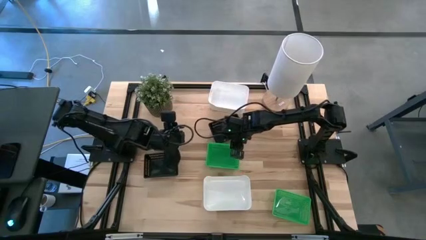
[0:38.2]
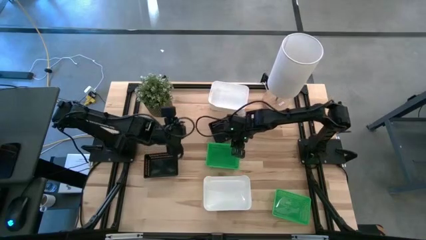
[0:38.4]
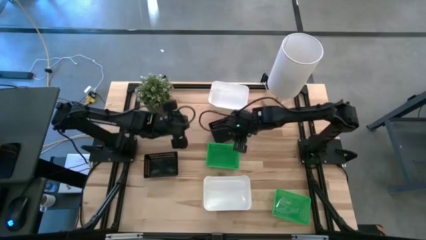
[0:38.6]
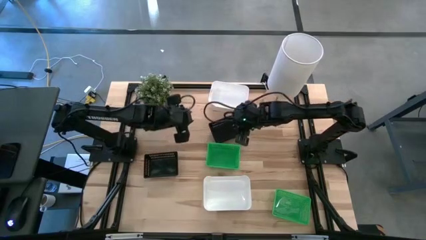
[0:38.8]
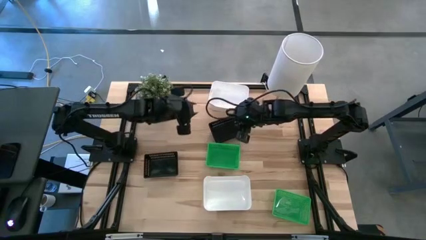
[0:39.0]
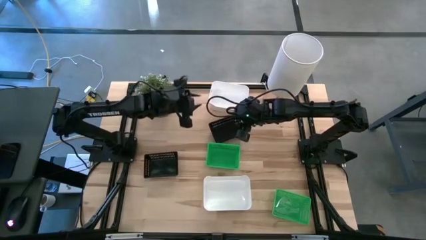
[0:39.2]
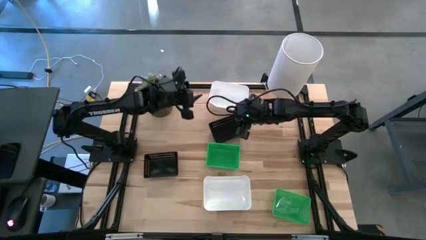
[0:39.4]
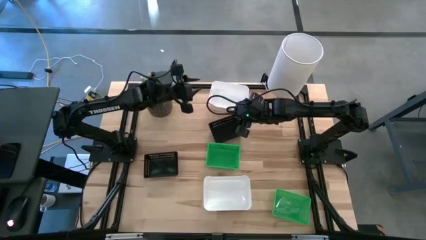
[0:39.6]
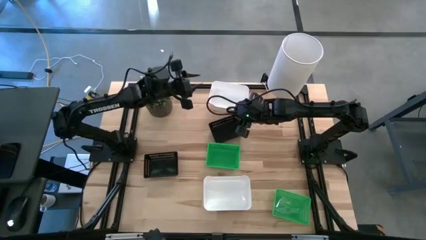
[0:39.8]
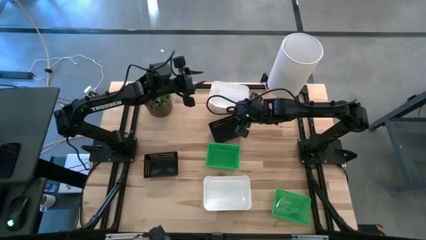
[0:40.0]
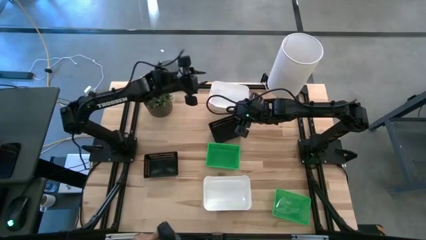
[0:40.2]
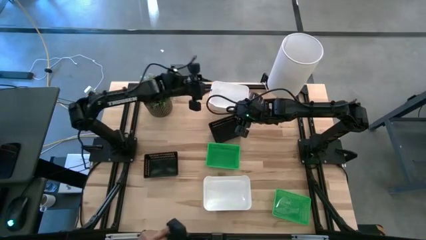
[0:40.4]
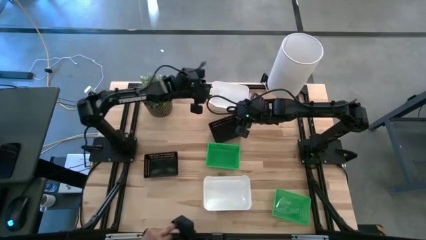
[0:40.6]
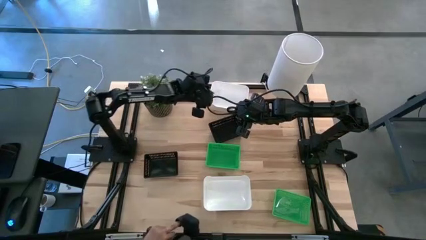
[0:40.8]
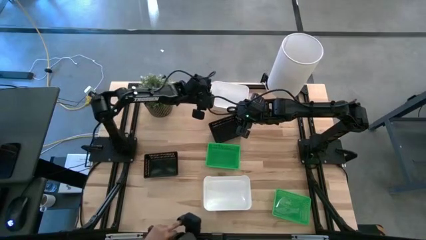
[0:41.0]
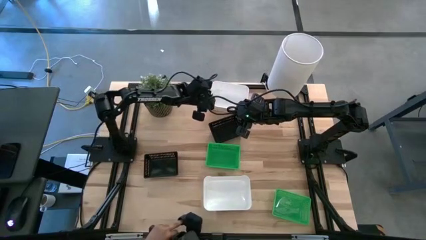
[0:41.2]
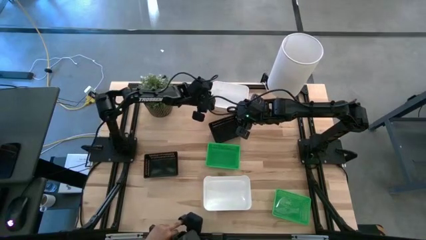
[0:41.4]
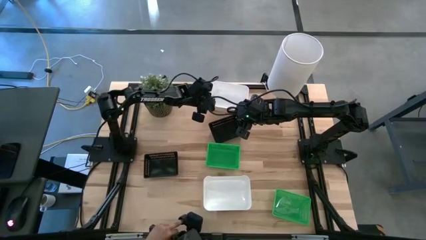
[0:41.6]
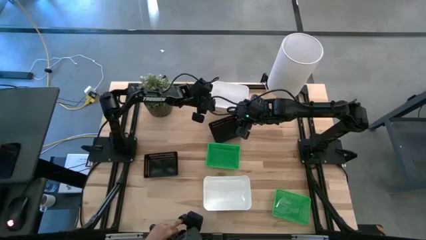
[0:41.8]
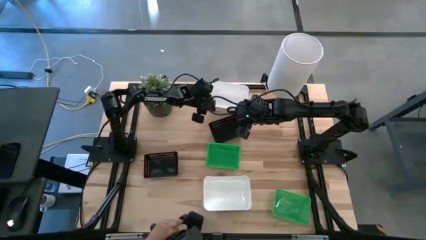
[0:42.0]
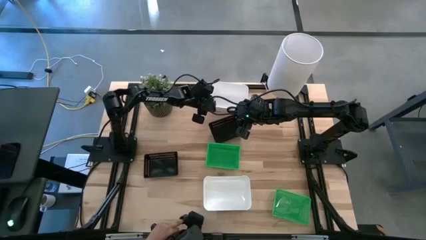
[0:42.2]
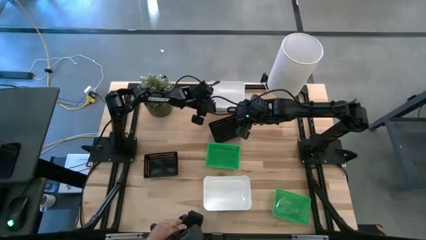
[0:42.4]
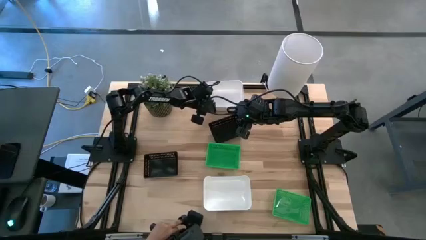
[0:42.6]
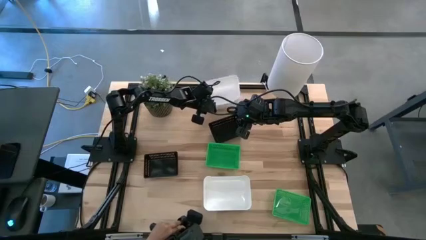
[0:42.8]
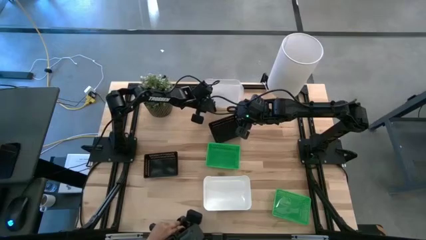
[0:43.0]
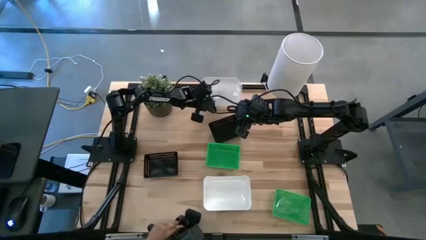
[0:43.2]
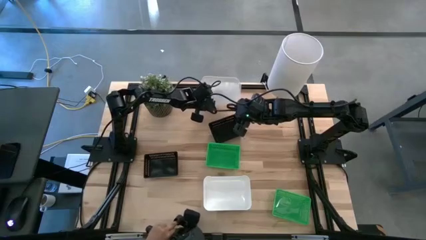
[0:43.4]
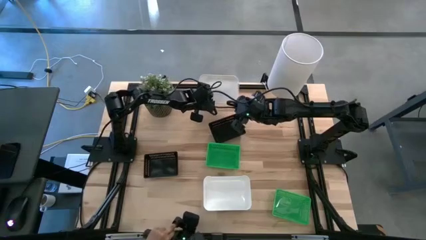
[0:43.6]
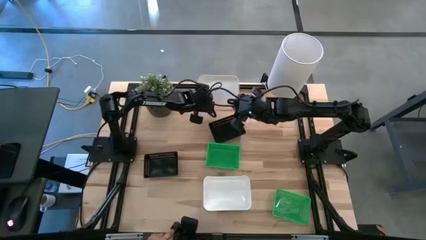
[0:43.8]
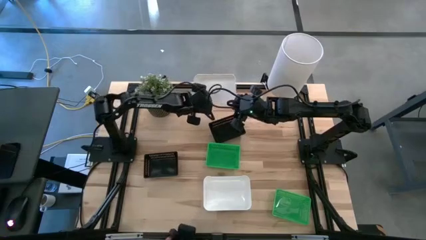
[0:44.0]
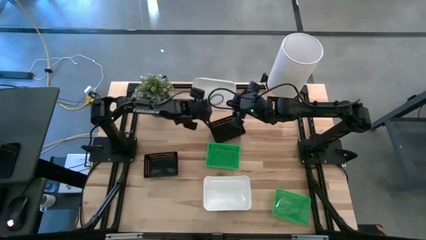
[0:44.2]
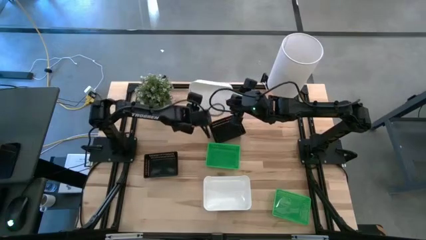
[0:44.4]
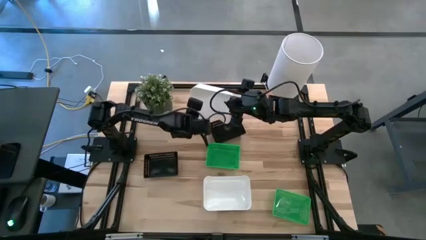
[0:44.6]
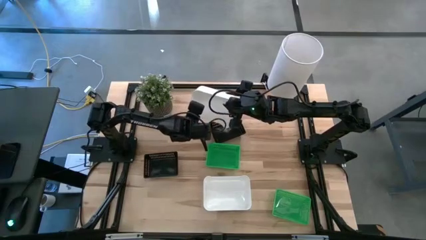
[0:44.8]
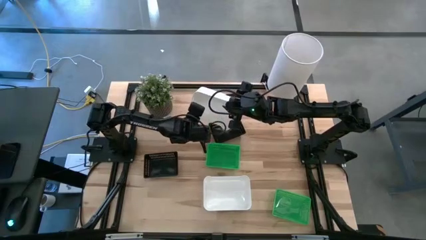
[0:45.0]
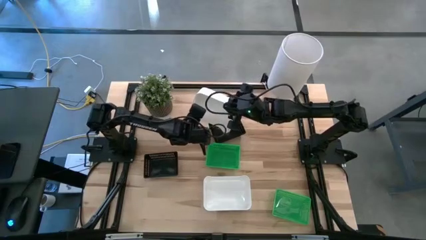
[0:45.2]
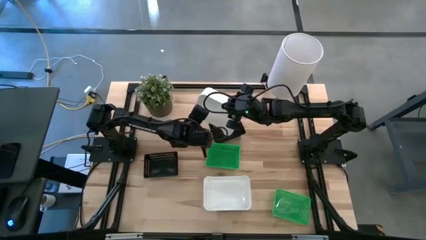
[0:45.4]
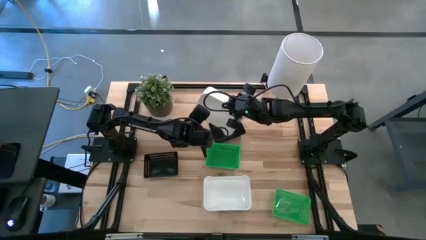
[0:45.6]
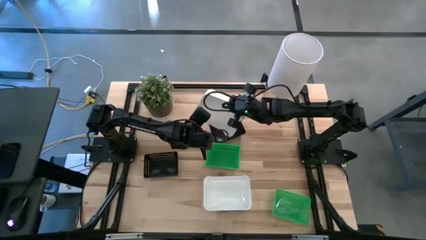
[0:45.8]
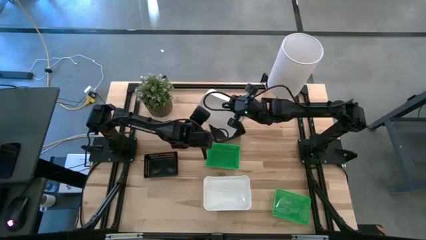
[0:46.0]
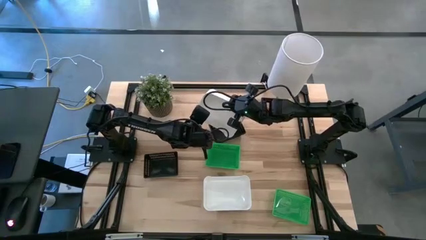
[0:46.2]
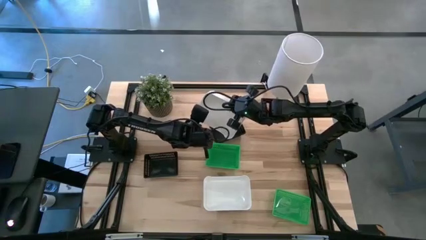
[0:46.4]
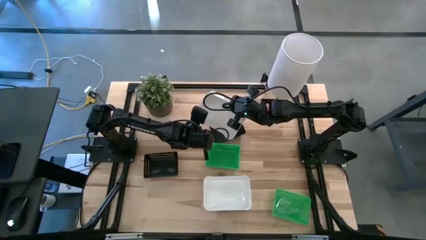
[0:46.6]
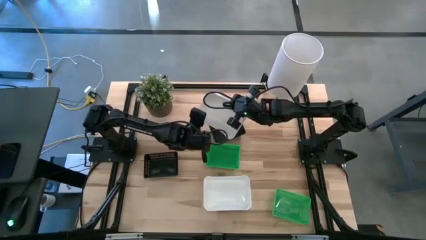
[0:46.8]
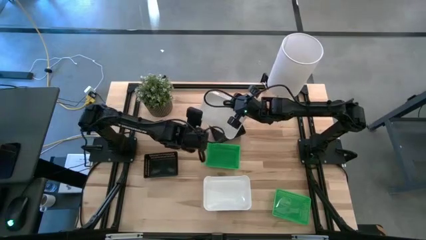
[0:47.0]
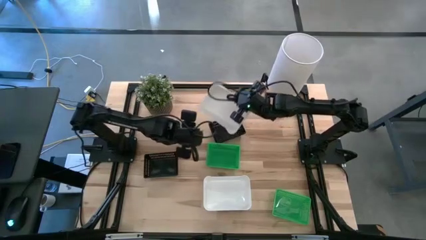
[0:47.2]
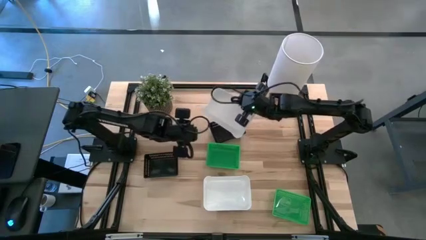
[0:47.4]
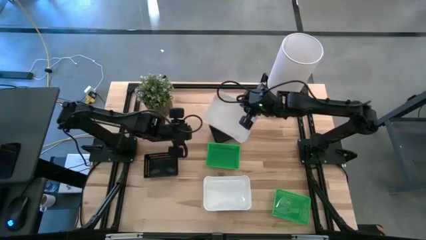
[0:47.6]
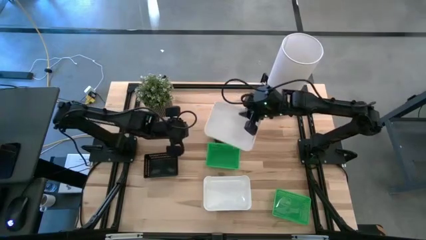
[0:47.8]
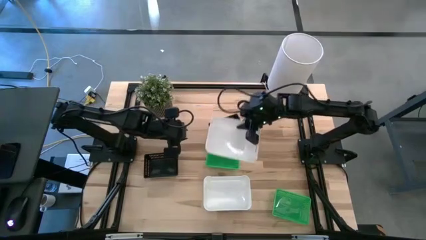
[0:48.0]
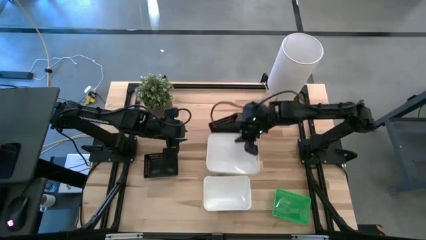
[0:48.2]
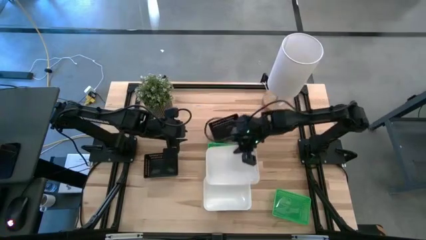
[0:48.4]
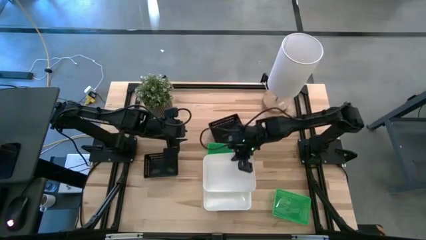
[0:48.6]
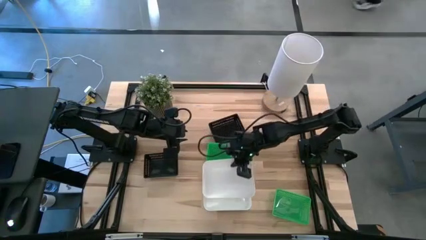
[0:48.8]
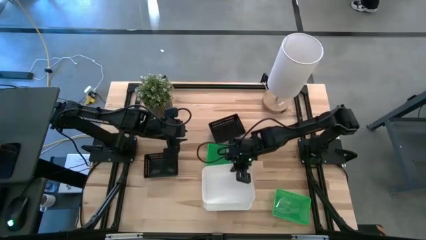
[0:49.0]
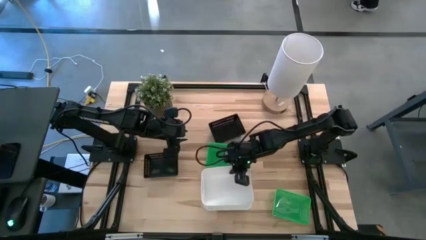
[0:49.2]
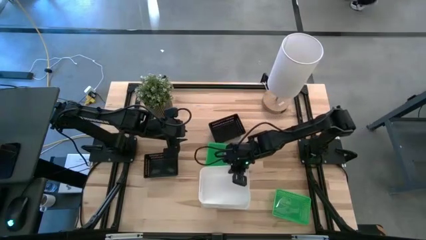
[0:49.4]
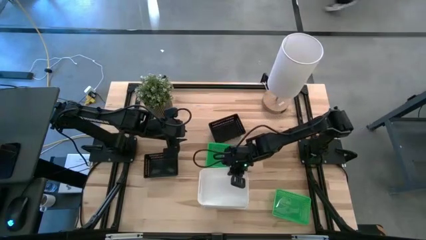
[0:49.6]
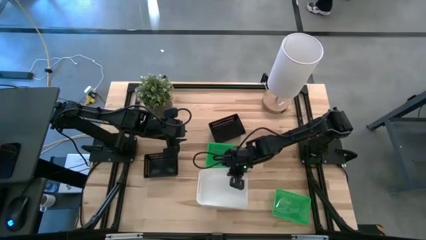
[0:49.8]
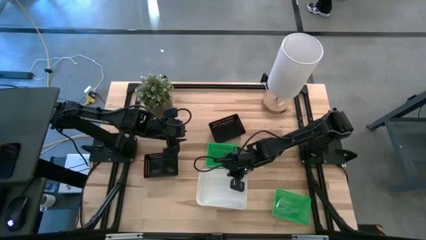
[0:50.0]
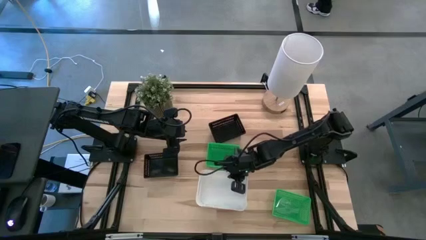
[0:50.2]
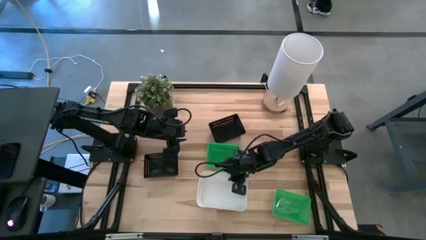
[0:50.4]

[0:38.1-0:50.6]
Stack the top white bin on the stacked white bin

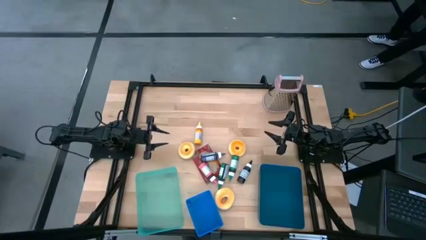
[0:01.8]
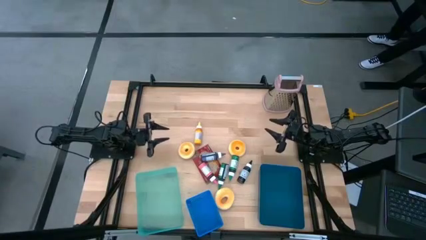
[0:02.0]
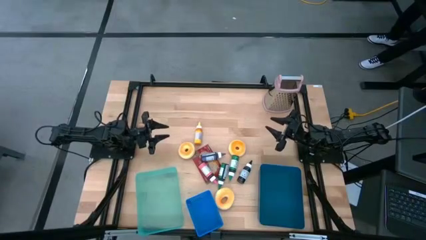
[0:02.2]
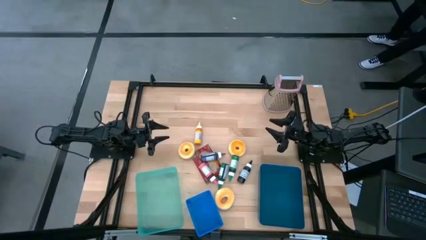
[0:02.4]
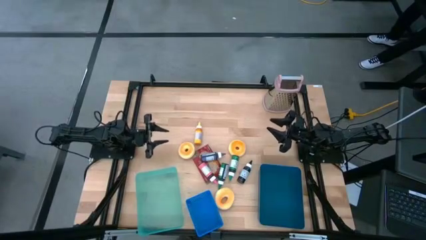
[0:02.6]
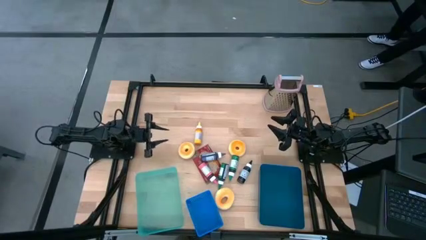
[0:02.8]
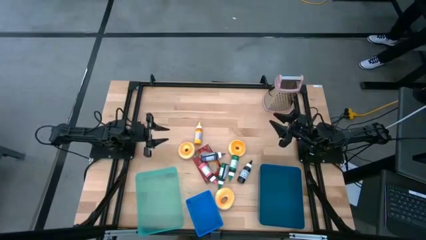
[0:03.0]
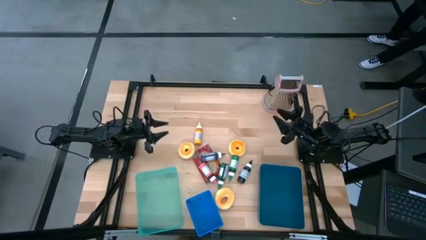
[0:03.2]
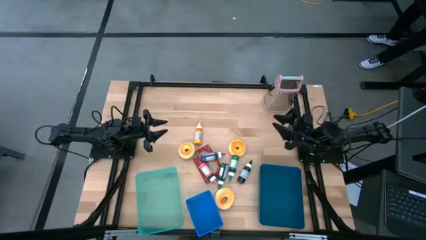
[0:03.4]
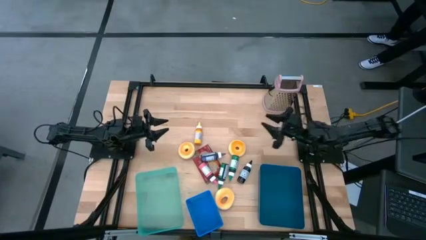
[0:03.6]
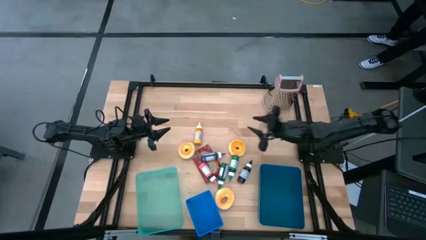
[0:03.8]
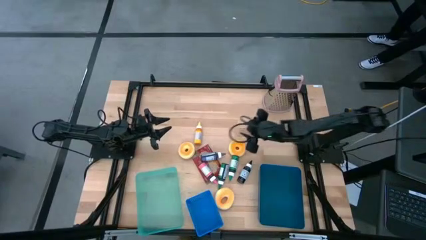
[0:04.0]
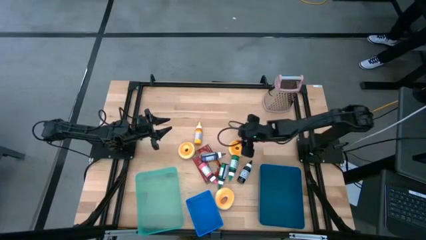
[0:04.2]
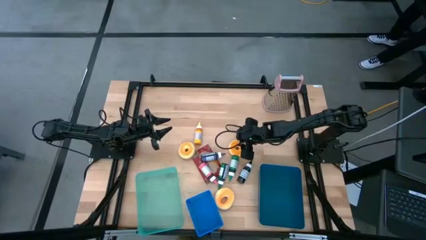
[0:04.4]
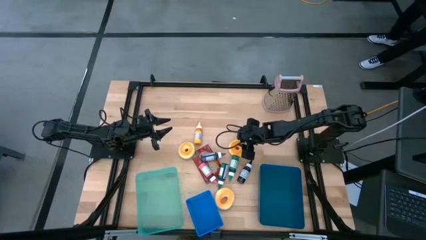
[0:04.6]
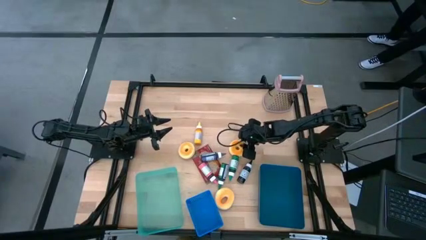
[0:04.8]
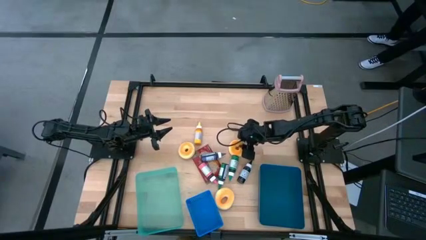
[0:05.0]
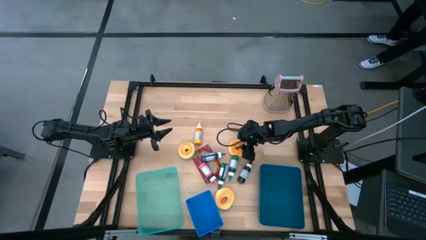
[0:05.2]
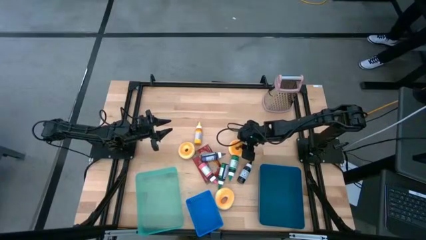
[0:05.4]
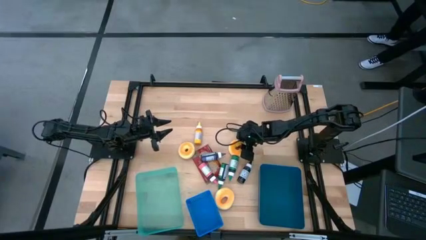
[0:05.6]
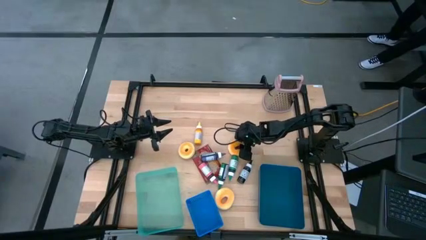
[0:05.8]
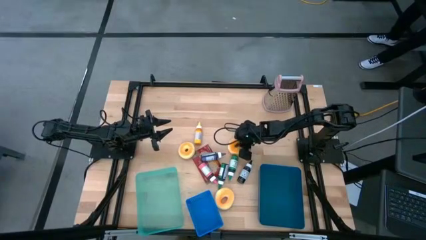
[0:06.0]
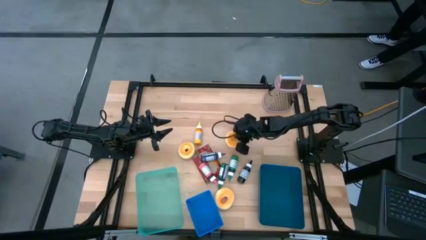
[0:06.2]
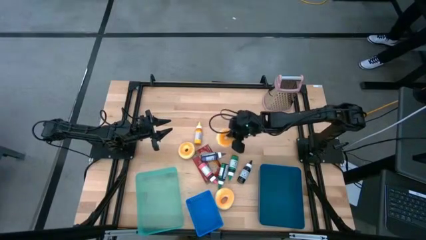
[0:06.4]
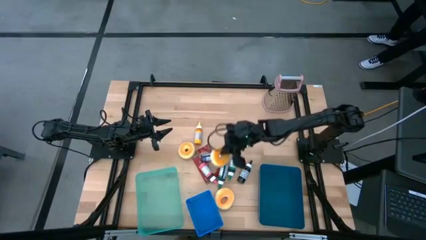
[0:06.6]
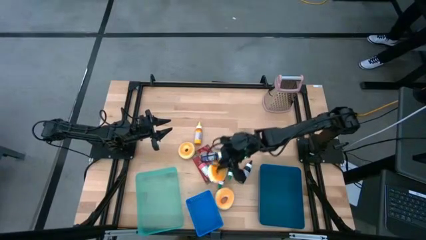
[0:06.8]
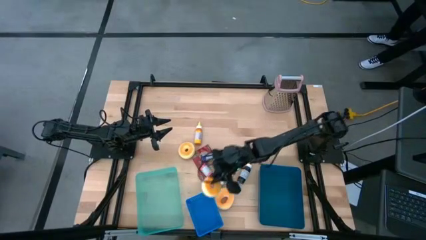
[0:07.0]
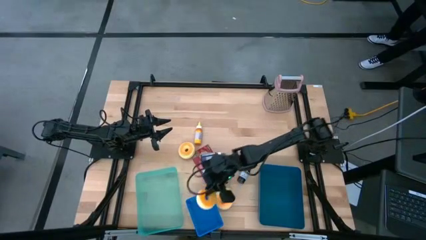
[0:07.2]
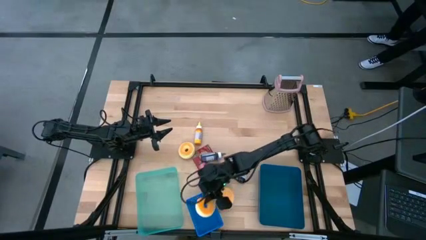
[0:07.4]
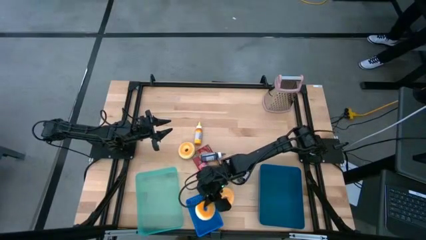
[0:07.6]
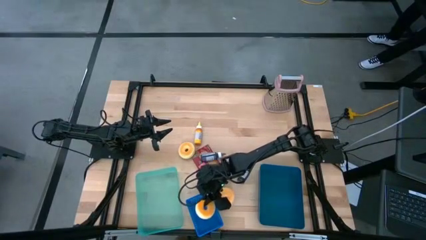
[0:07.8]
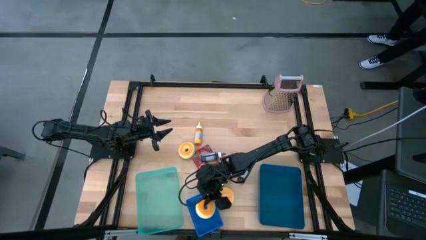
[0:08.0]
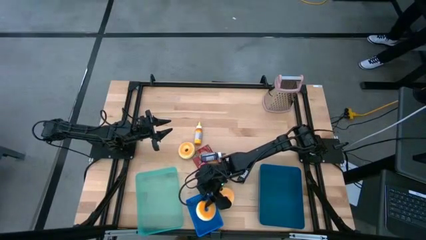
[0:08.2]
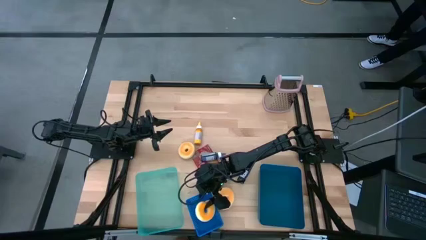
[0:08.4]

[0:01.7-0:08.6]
Put the top right donut into the blue bin
